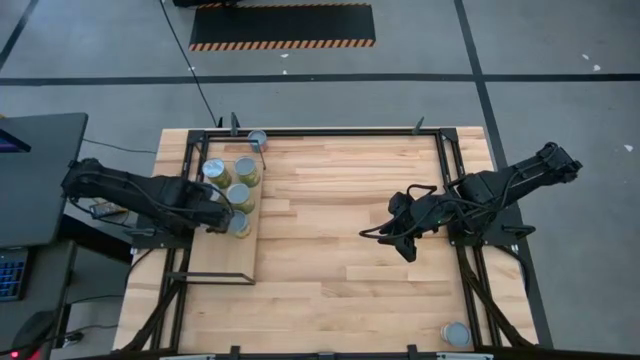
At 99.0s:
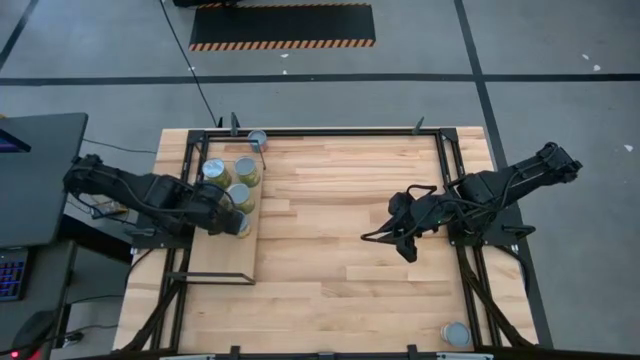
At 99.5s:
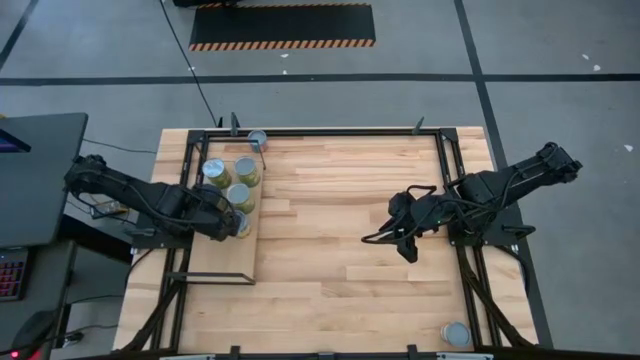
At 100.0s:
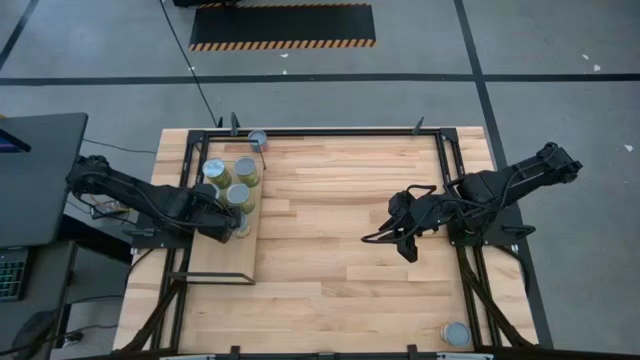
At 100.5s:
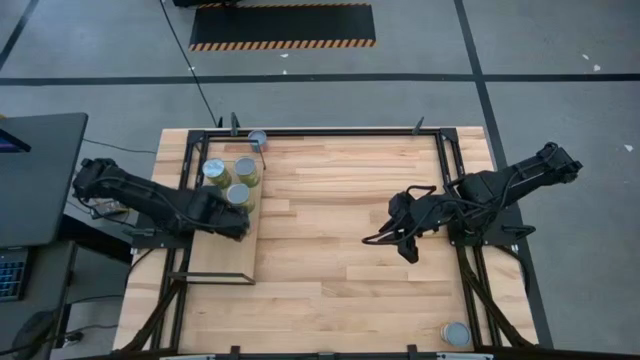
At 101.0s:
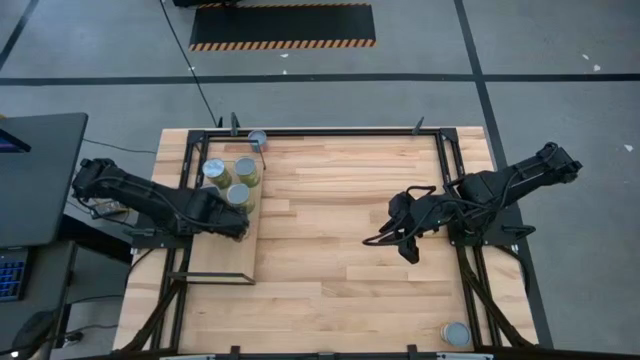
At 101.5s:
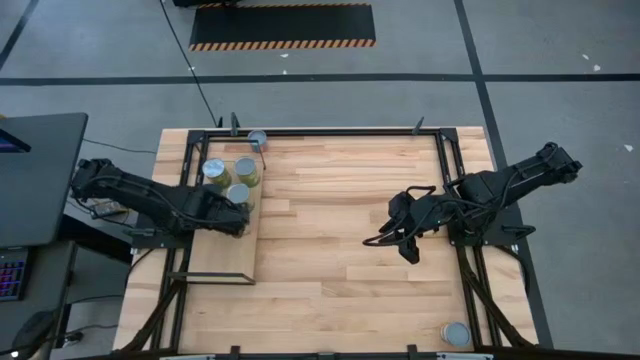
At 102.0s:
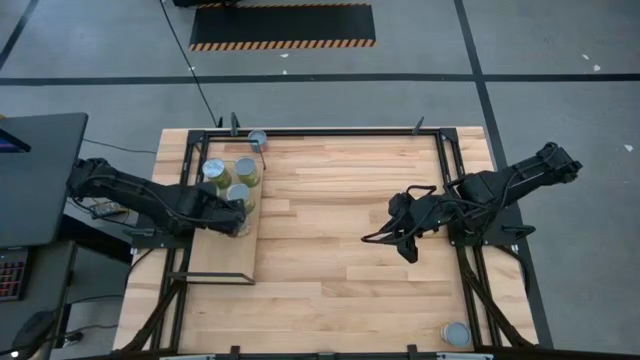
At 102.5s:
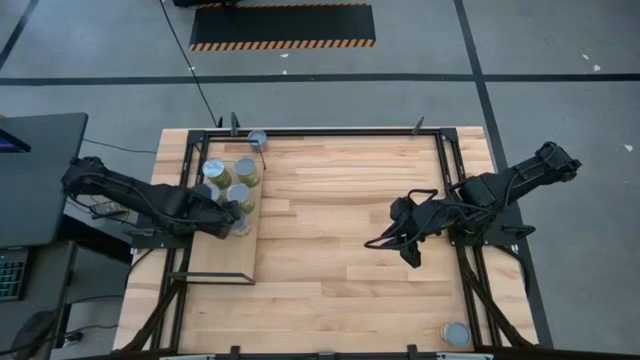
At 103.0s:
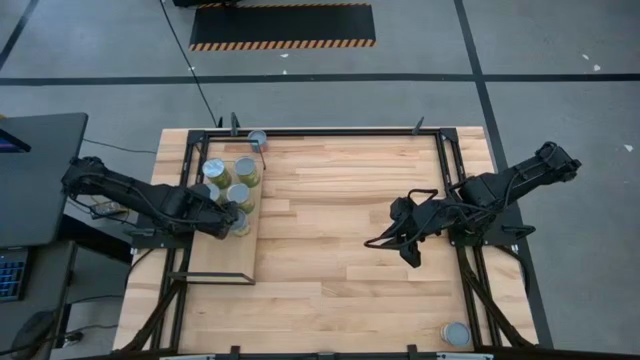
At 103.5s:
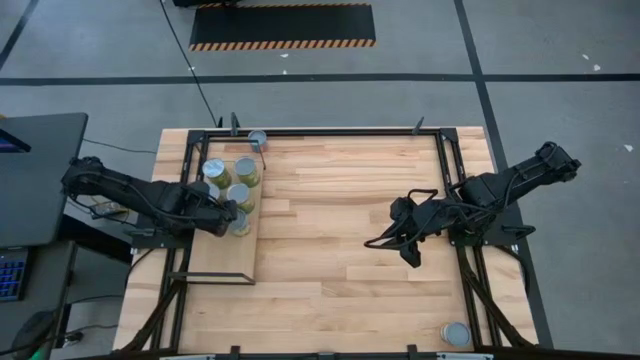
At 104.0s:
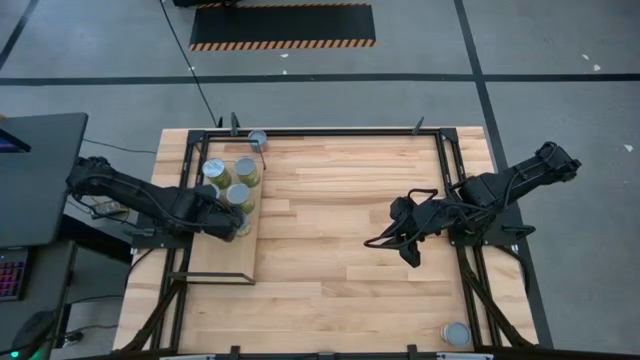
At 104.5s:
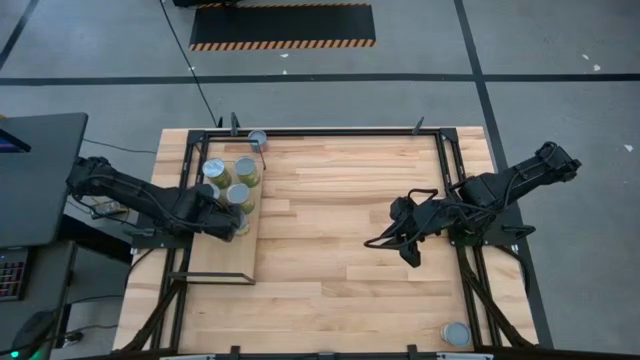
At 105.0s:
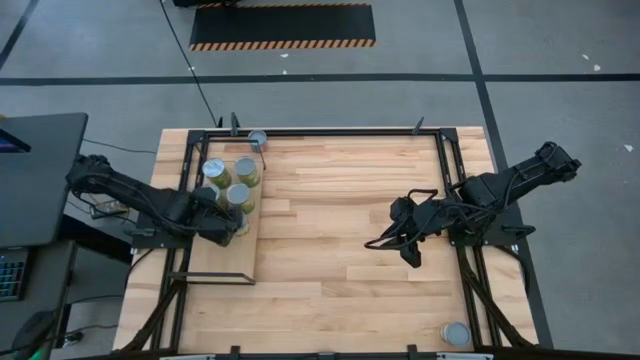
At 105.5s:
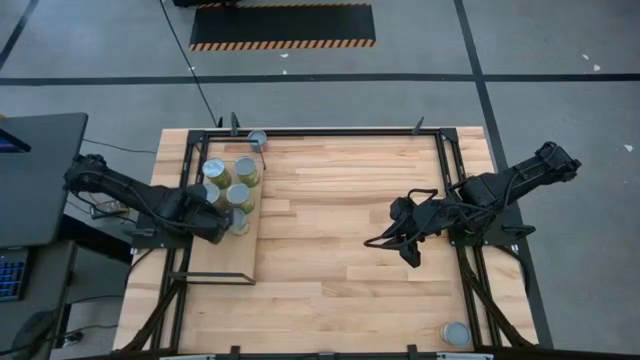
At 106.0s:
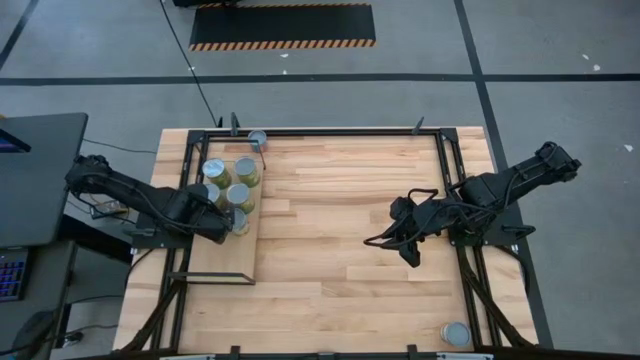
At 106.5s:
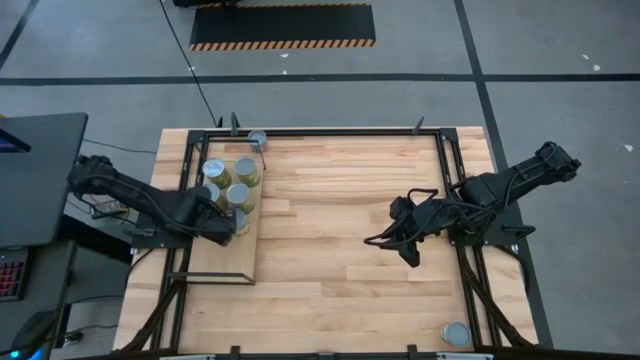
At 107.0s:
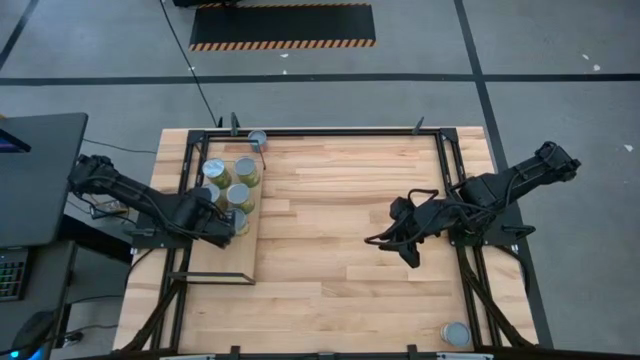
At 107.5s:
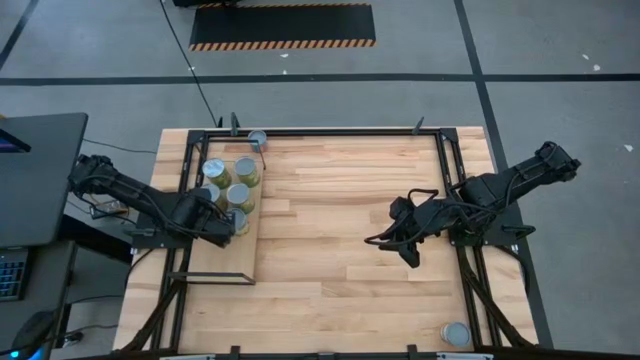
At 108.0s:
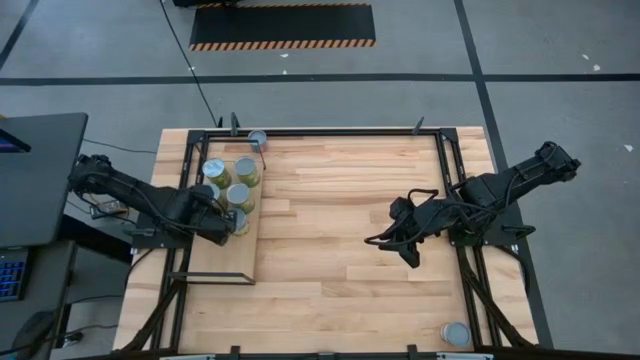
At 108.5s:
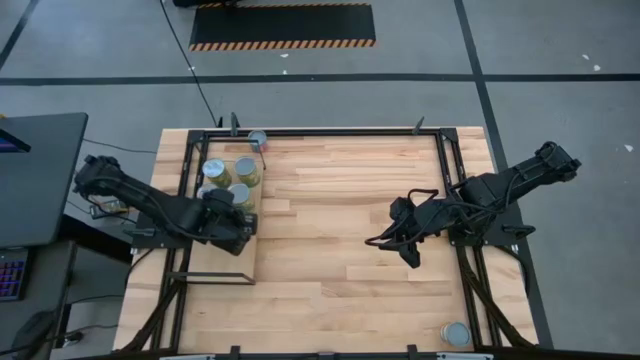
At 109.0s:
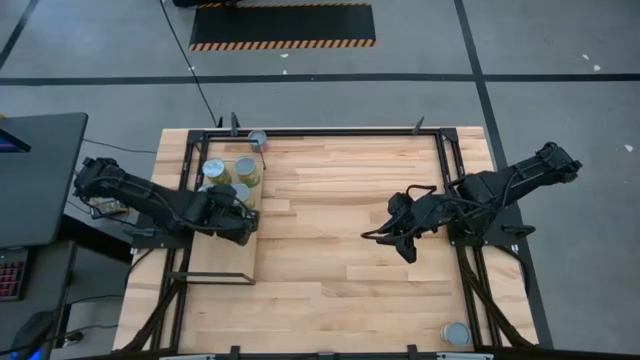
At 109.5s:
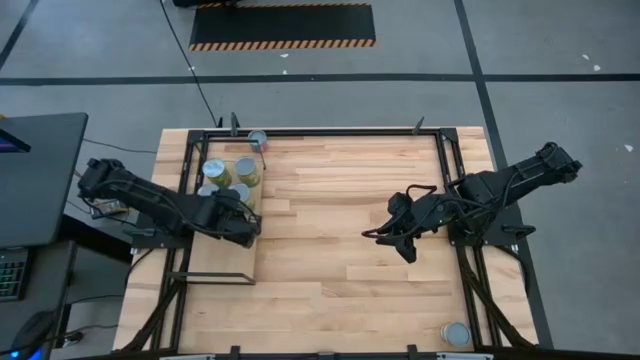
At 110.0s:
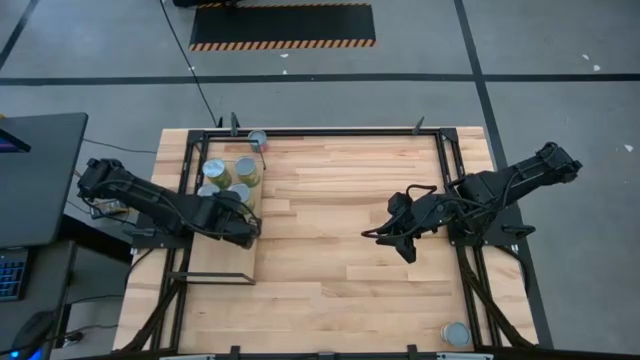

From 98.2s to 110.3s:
Task: Pick and place cans onto a shelf
Adjust the canned goods on the shelf

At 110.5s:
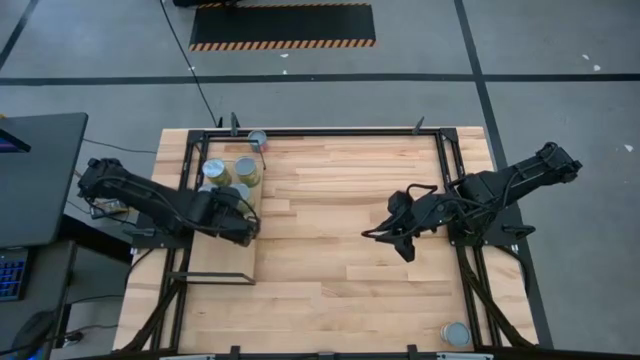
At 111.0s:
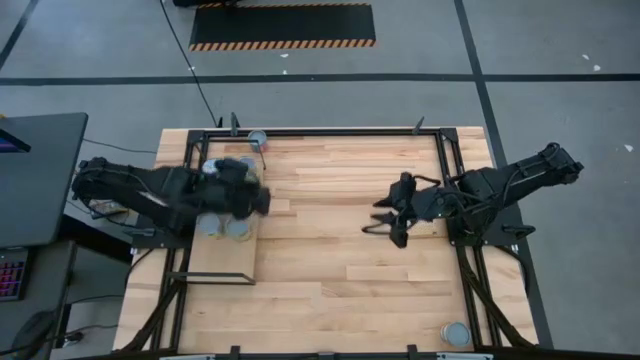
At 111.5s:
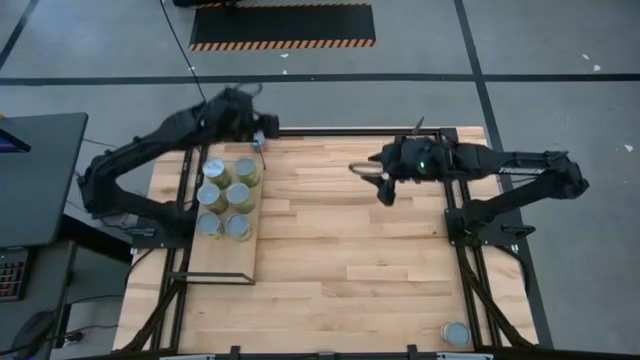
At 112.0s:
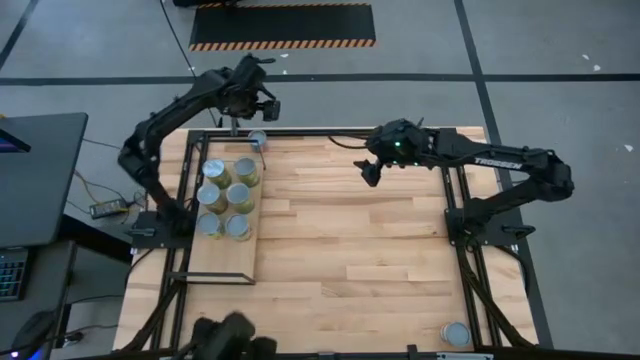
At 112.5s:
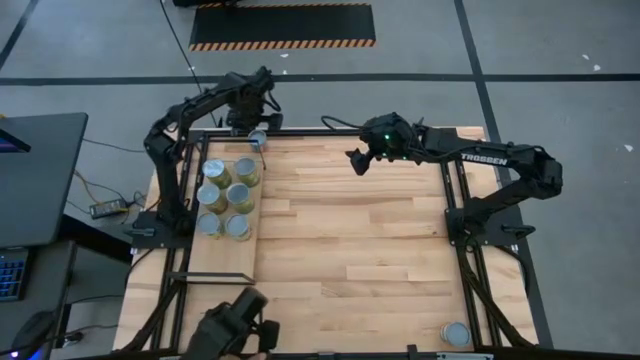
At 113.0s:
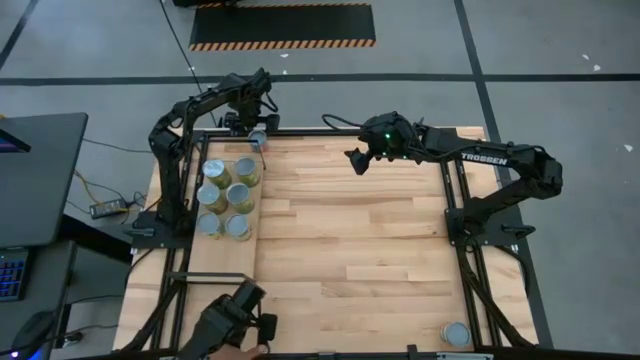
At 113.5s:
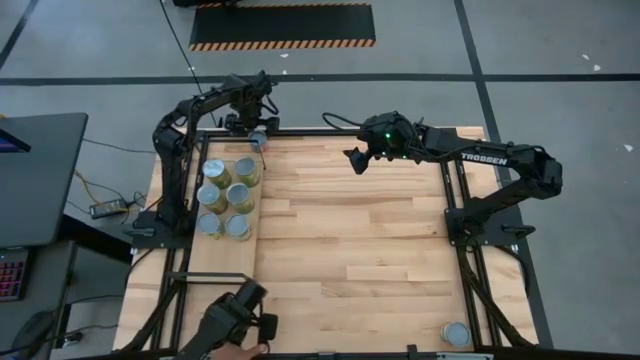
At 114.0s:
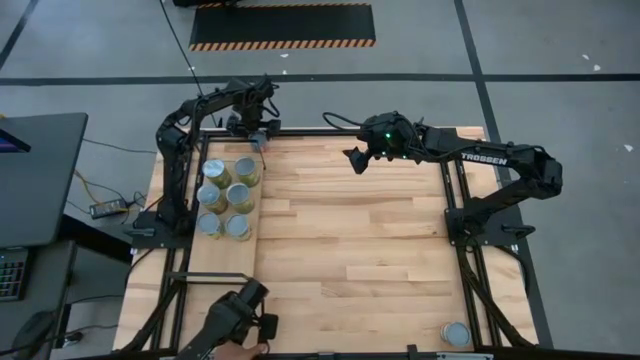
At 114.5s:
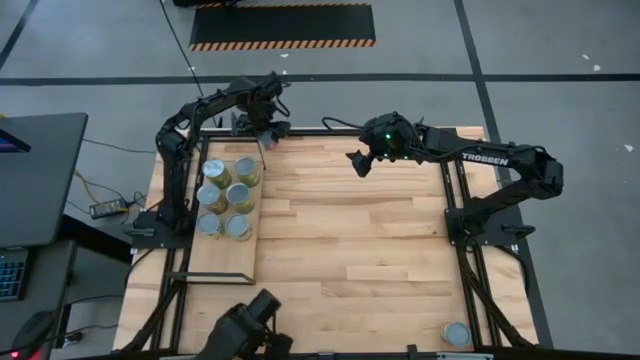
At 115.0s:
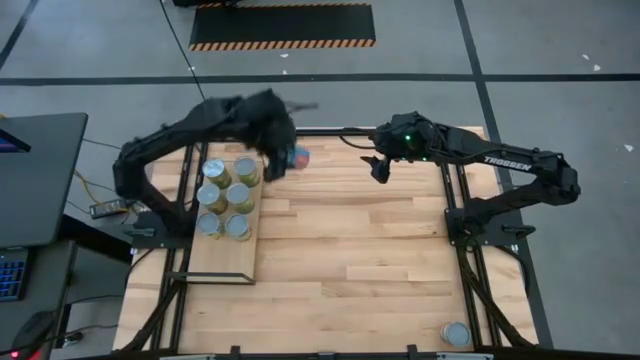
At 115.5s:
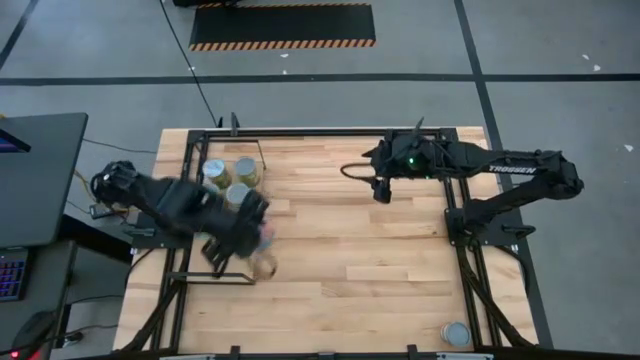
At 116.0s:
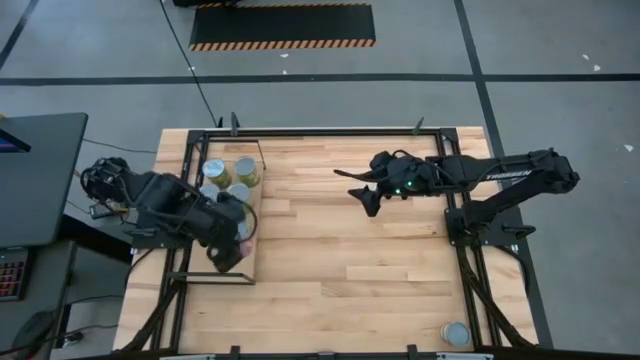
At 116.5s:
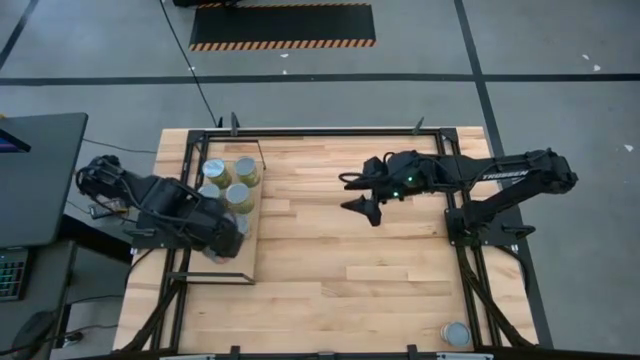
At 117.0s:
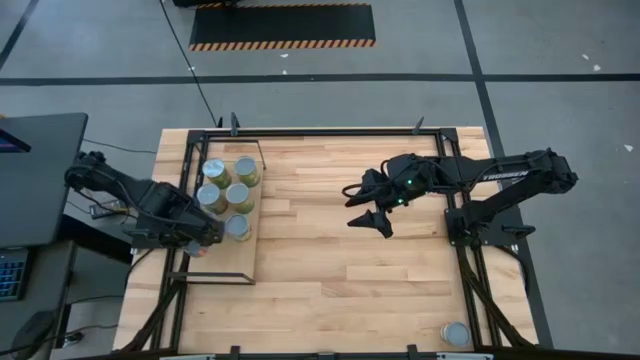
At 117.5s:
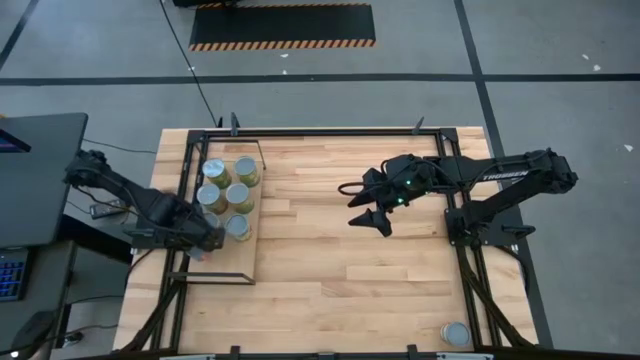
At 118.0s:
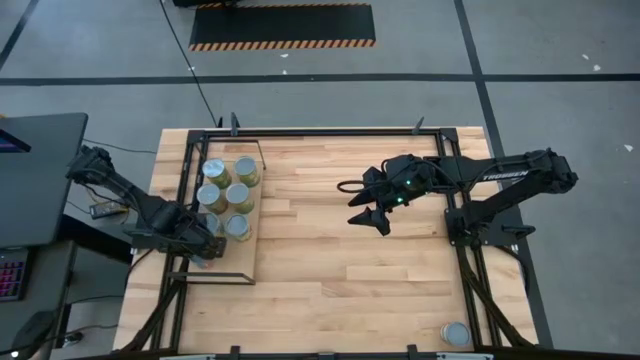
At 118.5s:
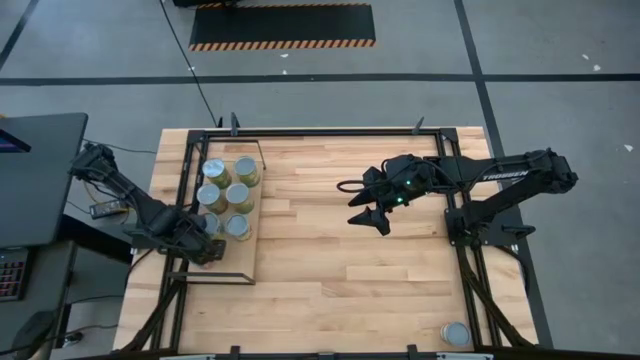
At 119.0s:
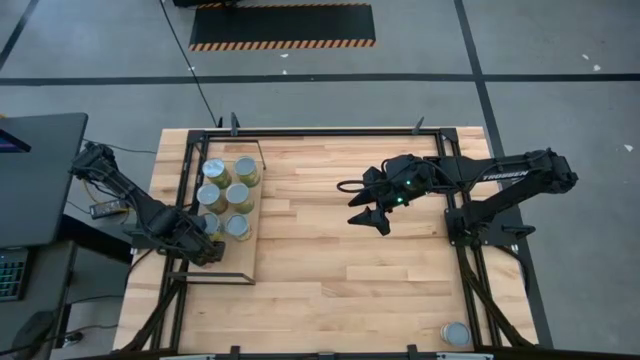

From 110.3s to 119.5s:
Put the canned corn on the shelf

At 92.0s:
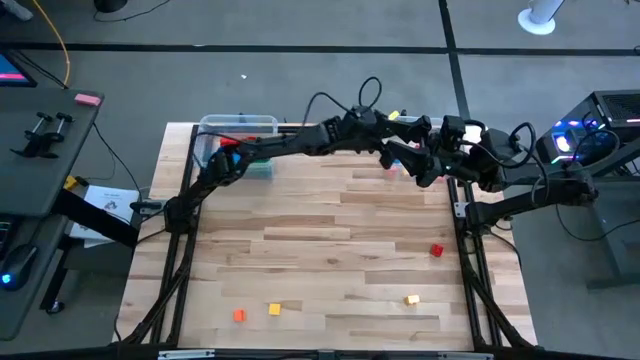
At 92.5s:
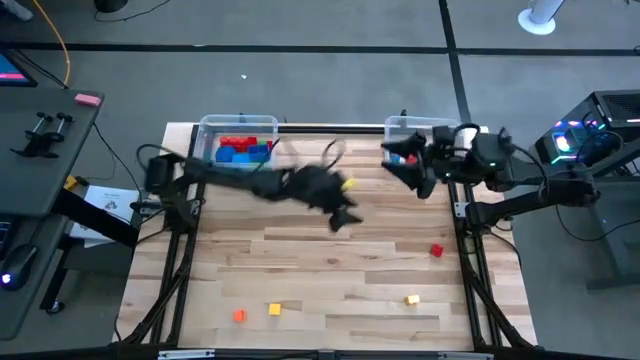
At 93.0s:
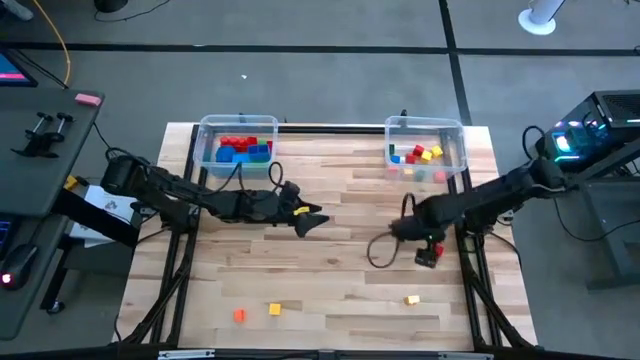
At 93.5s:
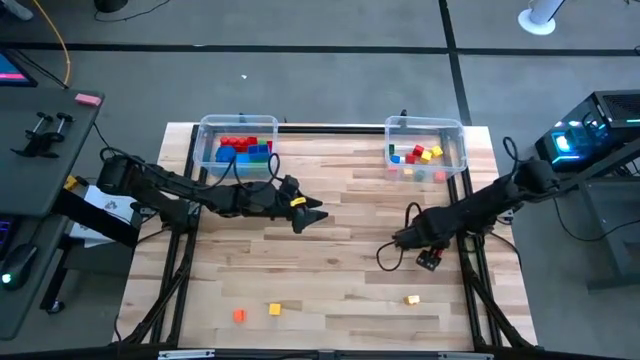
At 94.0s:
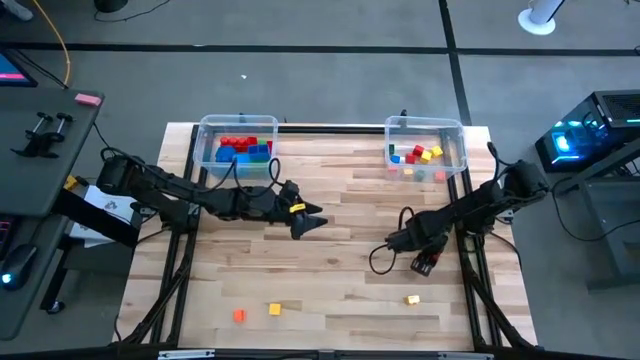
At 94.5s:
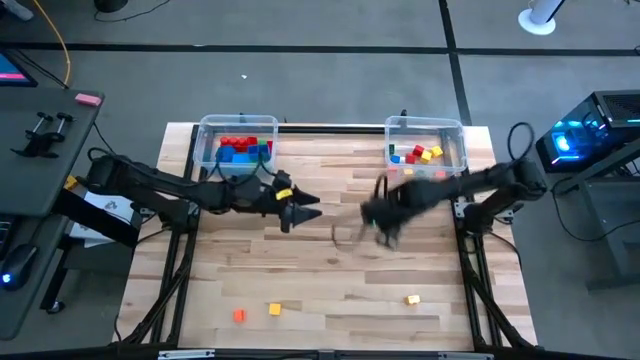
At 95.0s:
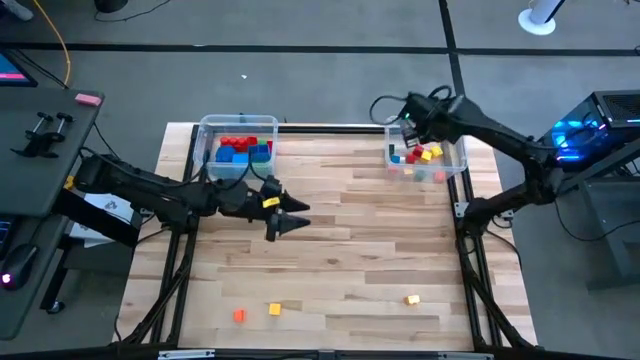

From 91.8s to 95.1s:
Task: Sort blocks by size
Put the small game piece into the right transparent bin
